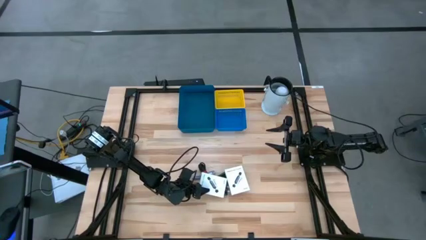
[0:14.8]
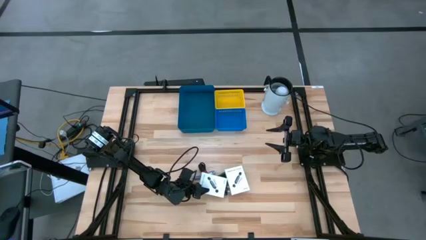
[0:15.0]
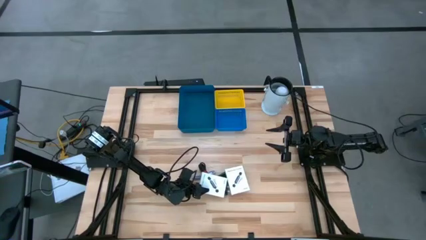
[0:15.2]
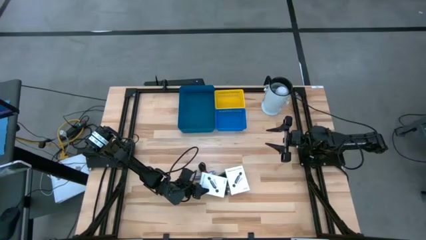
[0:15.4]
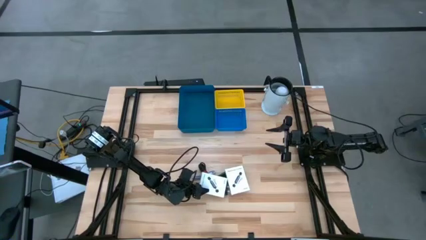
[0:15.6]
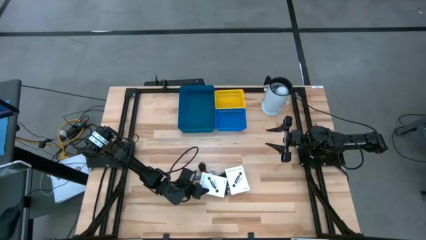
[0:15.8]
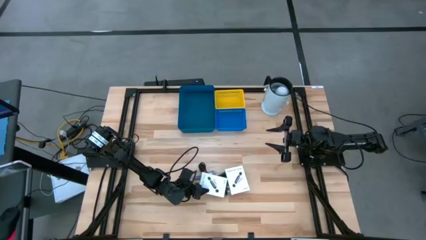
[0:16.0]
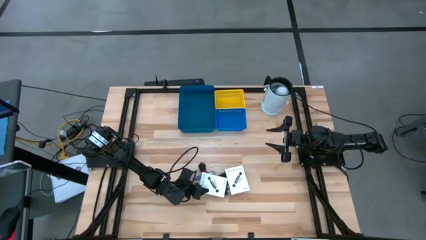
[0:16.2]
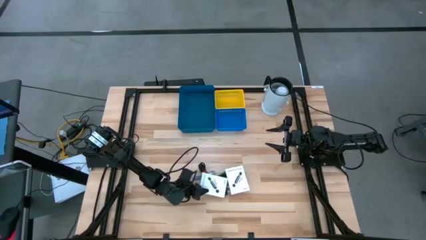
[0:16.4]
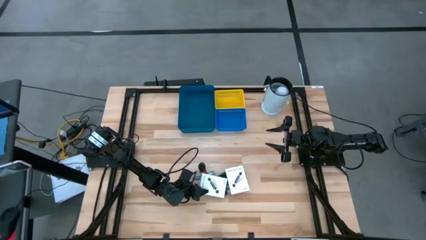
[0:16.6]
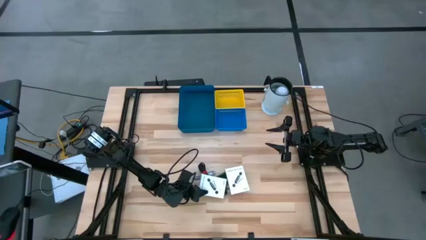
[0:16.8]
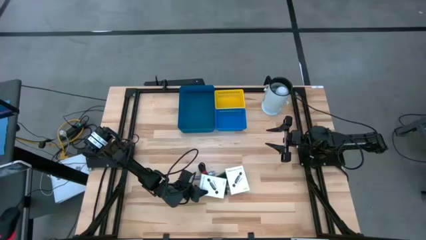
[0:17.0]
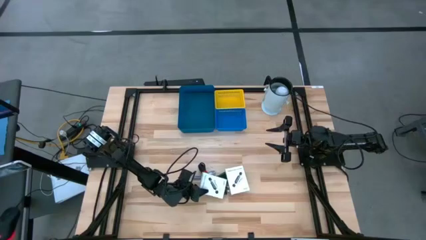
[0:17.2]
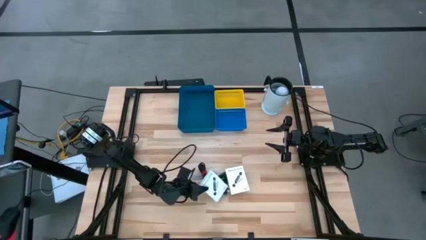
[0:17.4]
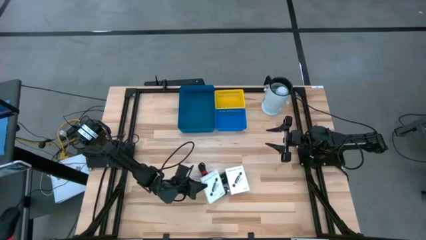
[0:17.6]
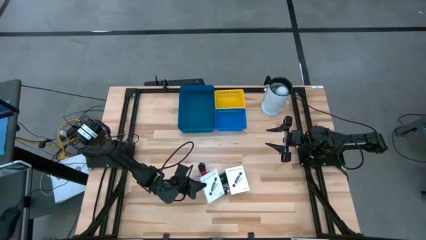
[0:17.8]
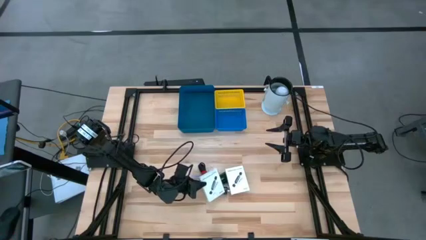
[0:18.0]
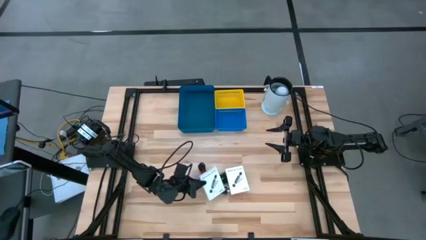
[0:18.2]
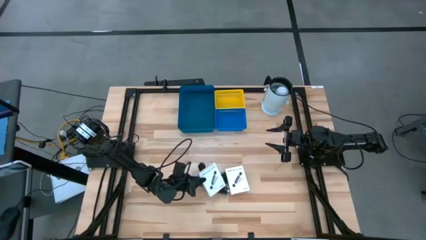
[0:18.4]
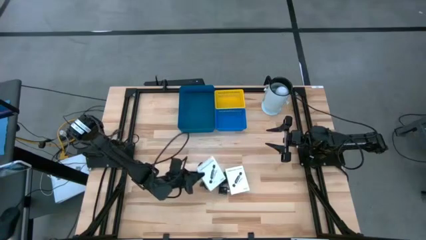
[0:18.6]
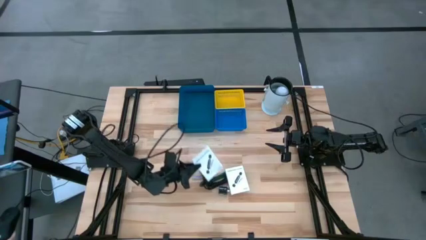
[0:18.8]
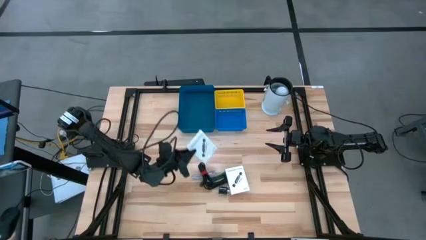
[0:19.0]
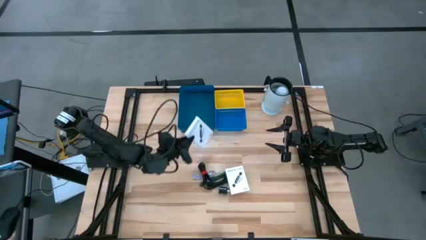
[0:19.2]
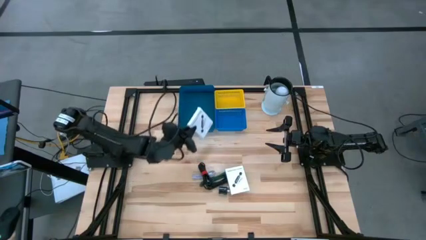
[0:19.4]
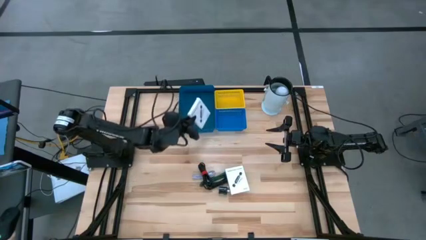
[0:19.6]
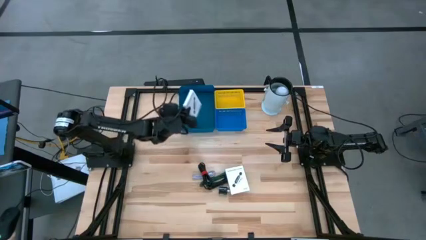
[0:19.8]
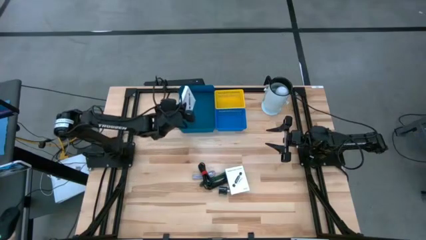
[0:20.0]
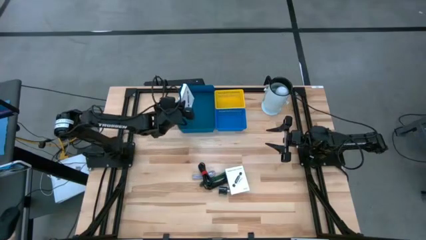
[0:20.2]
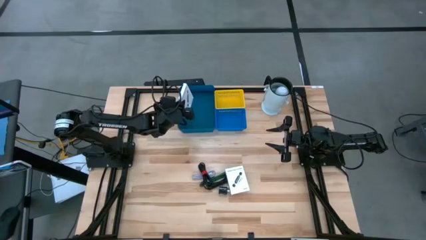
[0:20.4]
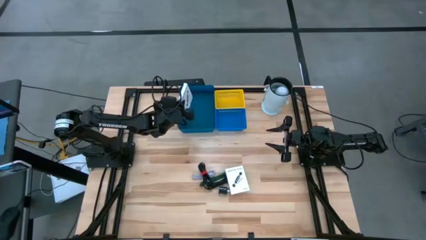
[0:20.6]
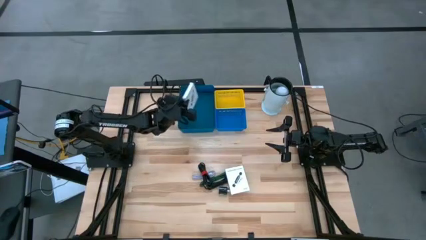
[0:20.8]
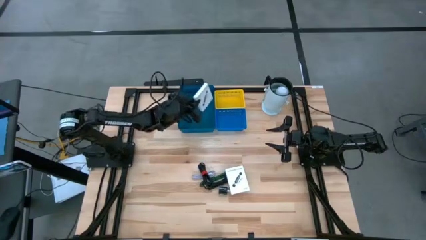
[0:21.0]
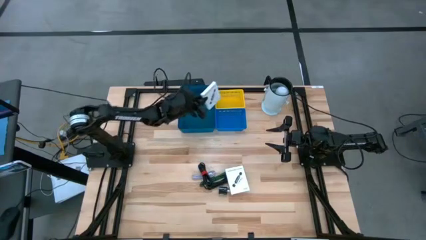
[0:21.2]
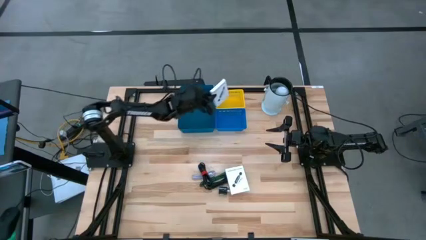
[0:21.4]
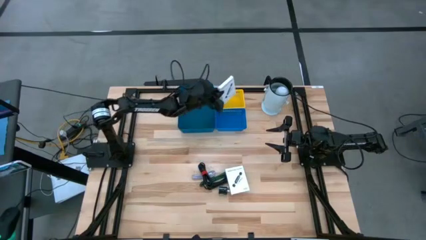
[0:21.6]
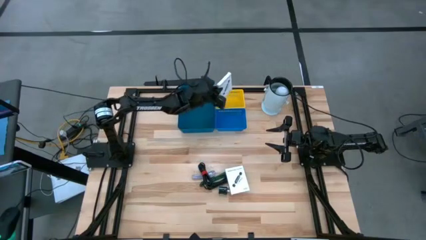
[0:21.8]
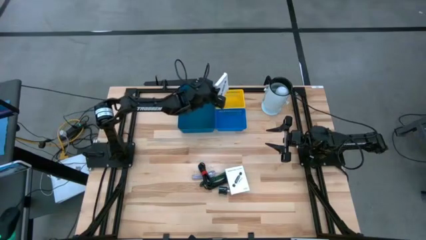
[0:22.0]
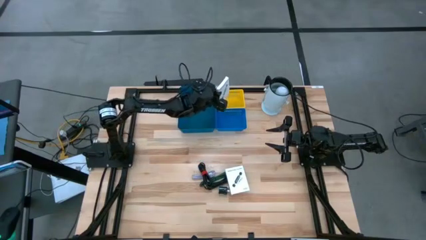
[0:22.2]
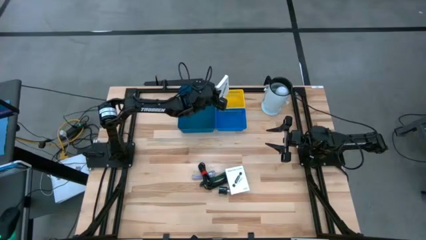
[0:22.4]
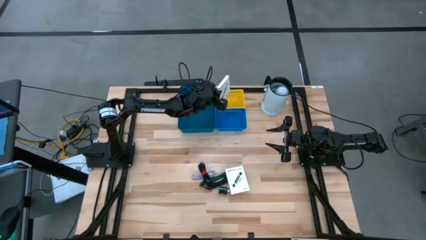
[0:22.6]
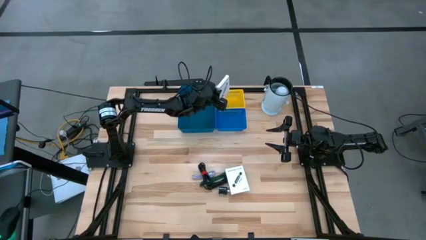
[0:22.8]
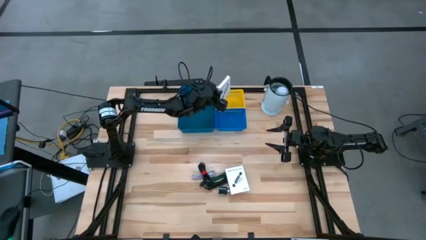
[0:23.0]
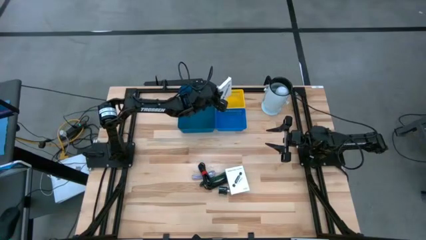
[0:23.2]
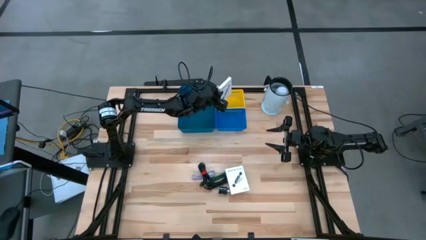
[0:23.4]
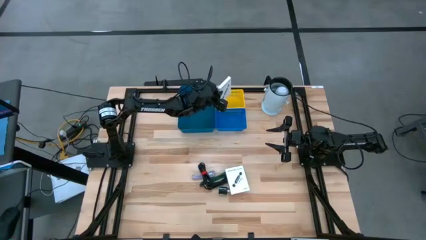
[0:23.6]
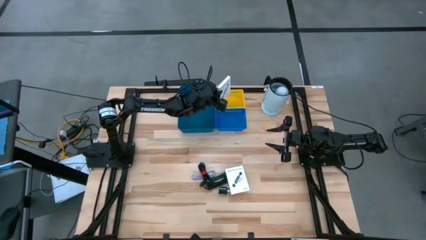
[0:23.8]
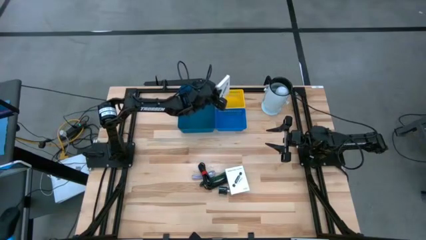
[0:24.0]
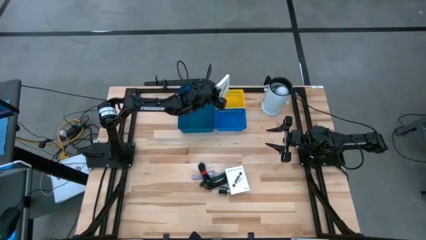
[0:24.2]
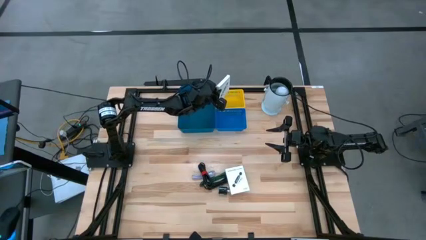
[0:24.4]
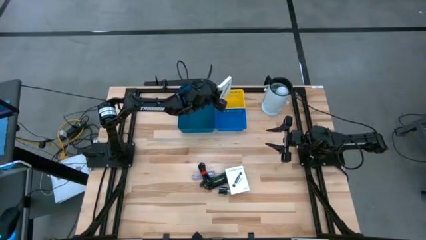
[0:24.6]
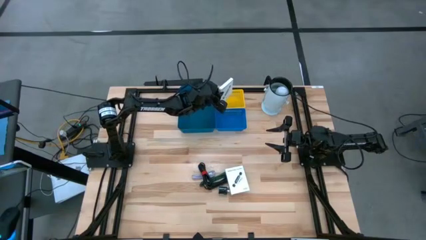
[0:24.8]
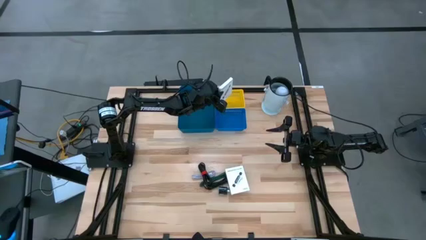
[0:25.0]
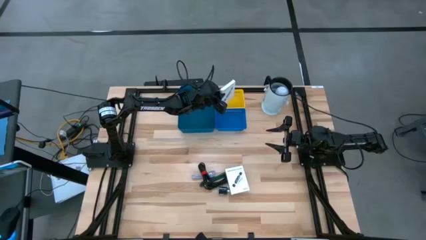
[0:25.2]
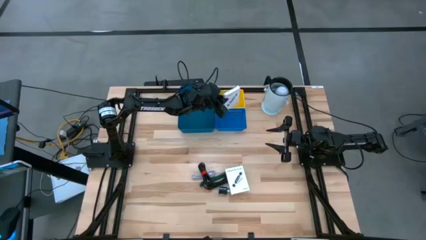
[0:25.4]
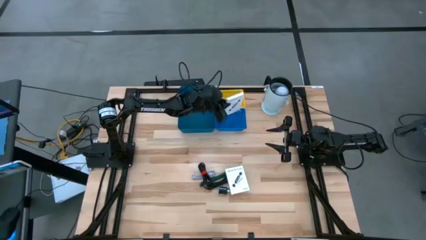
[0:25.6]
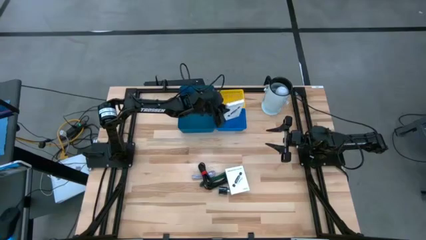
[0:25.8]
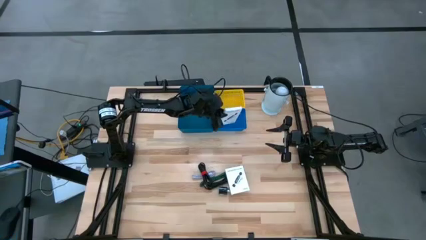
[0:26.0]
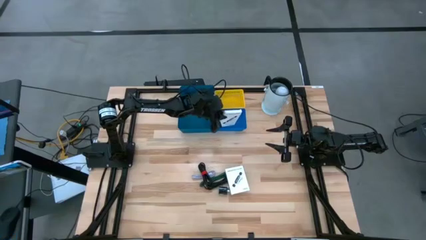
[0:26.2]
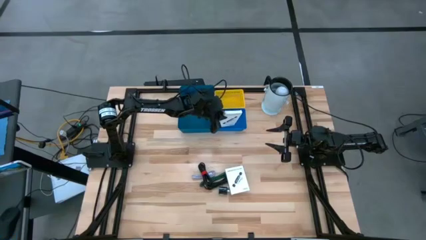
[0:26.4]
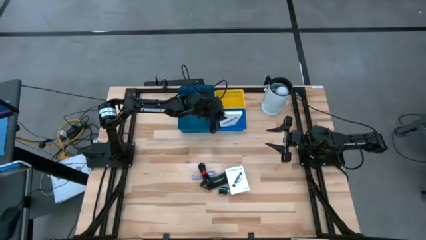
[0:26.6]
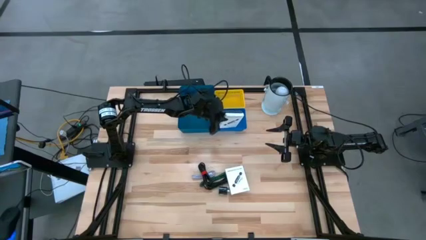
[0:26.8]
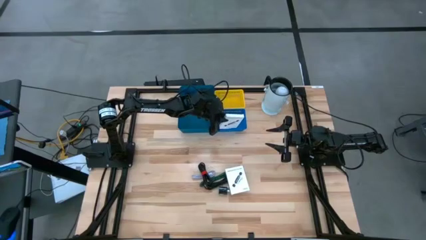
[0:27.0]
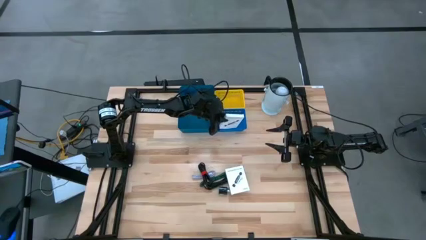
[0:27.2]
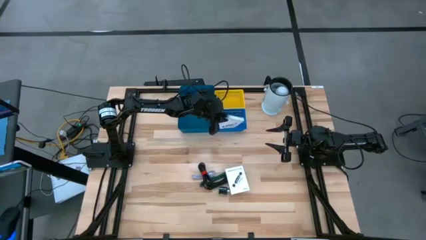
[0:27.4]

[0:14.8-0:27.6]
Task: Pick and place items into bin
Put the left white card reader box into the blue bin
